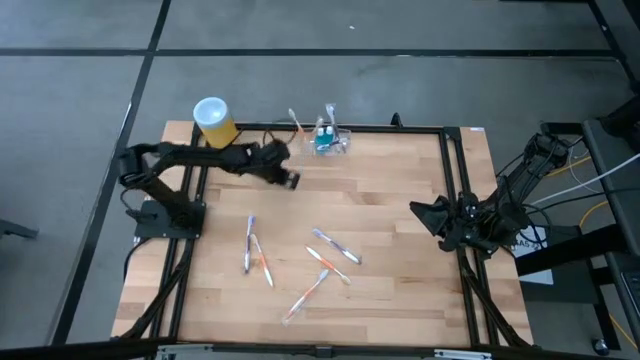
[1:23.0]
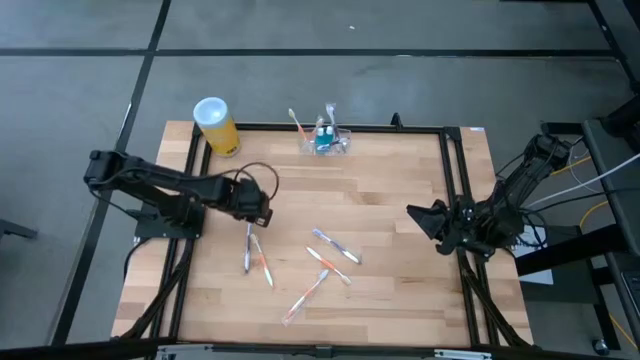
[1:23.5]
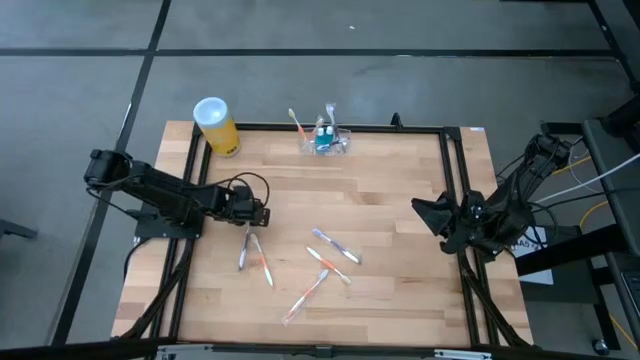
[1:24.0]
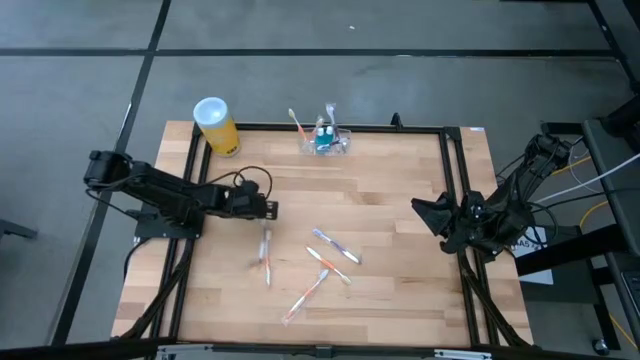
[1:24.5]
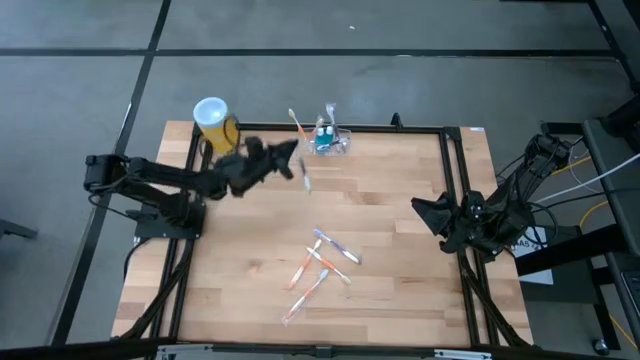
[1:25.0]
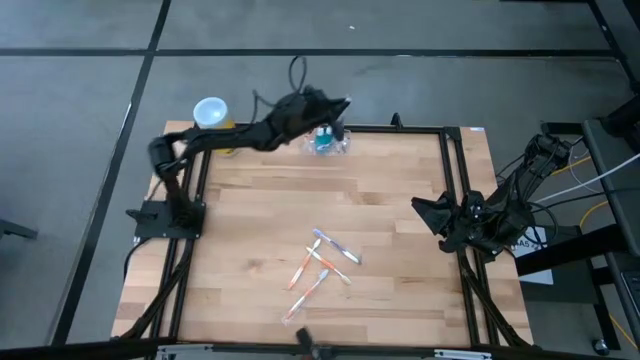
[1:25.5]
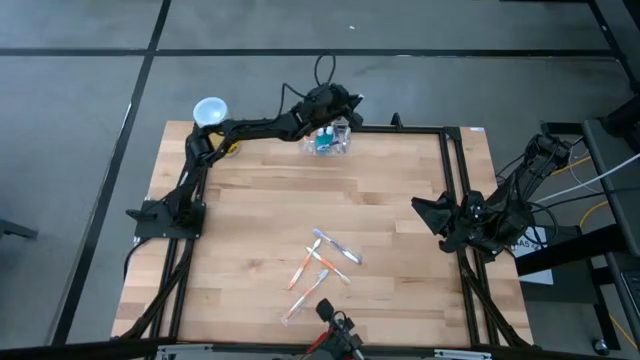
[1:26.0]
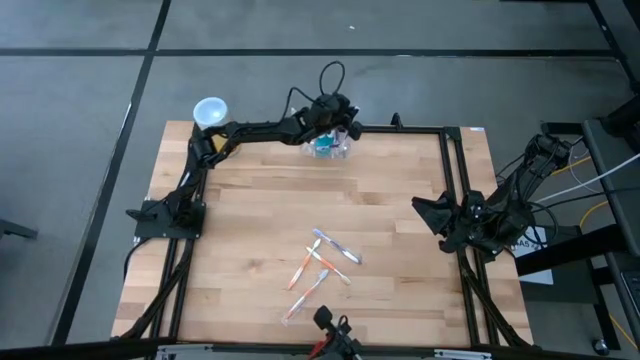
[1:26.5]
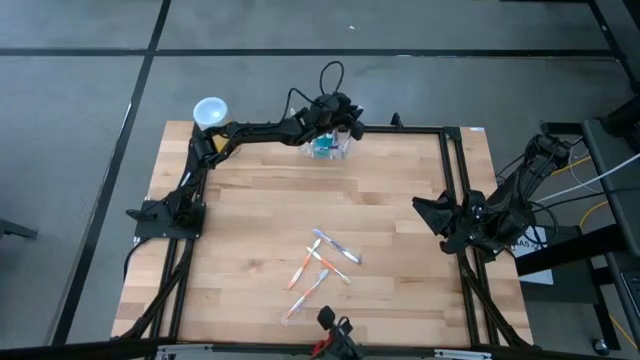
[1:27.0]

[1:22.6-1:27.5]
Task: Pick & Place toothbrushing station
Put the purple toothbrush into the right section of the transparent organizer

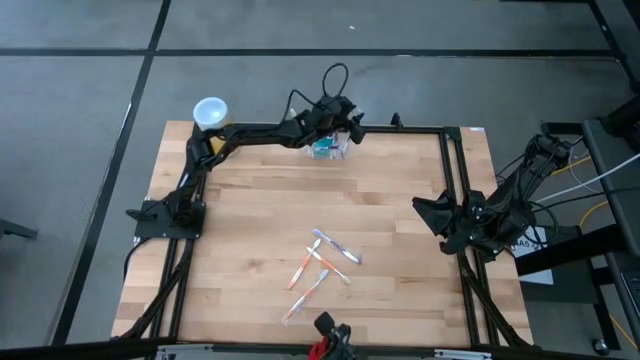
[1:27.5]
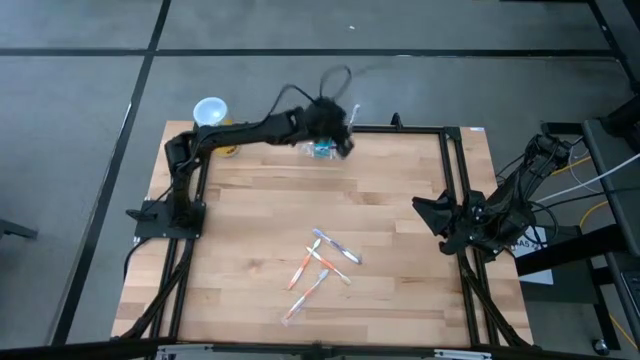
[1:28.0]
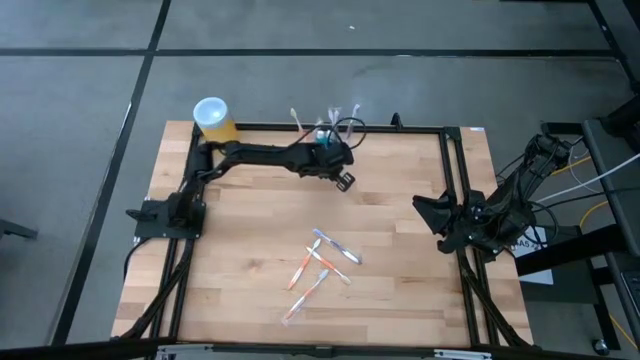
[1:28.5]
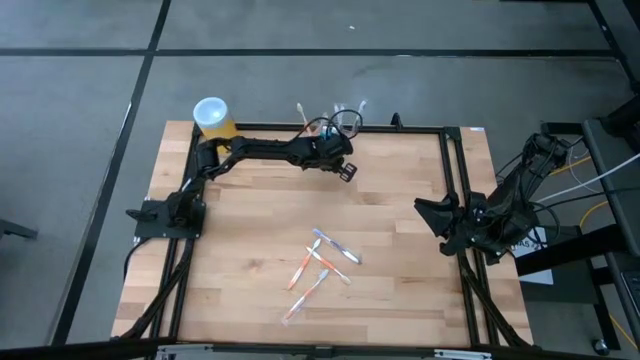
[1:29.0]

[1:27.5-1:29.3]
Adjust the transparent organizer on the table

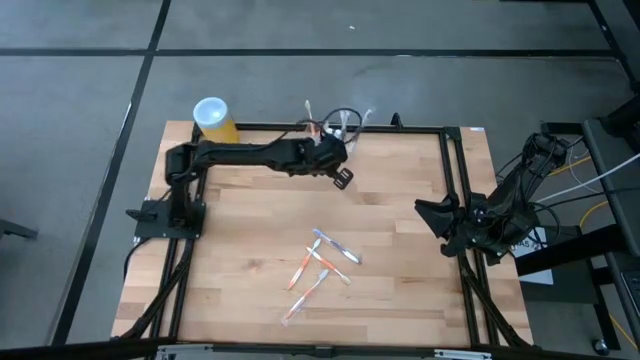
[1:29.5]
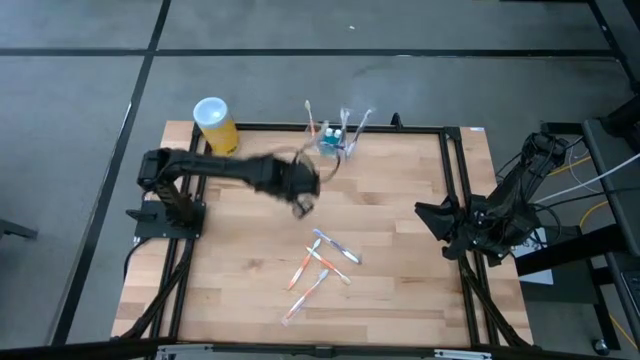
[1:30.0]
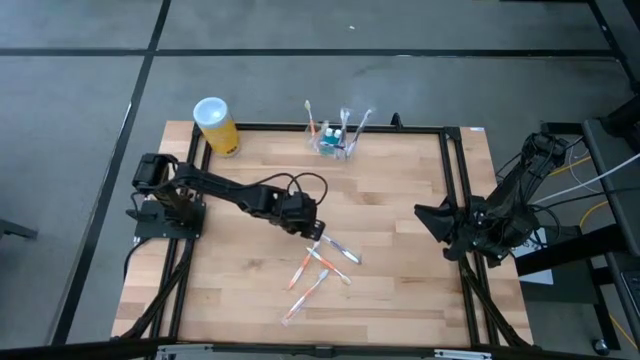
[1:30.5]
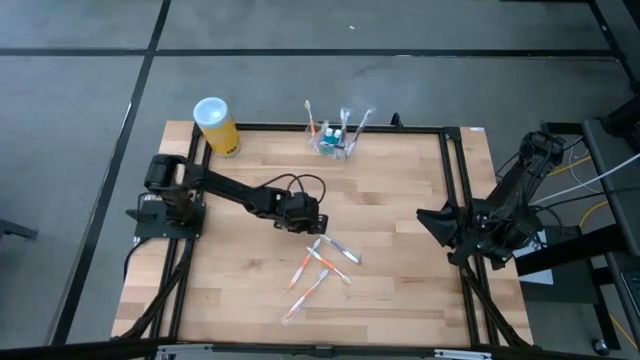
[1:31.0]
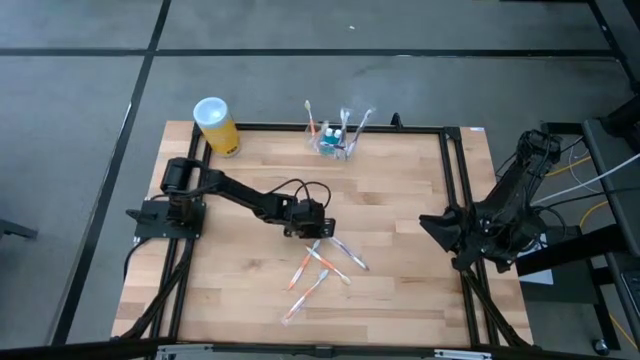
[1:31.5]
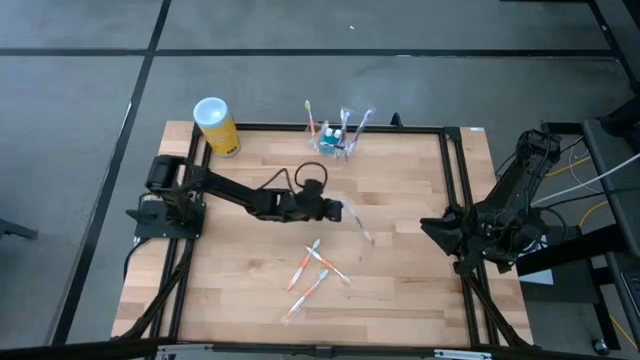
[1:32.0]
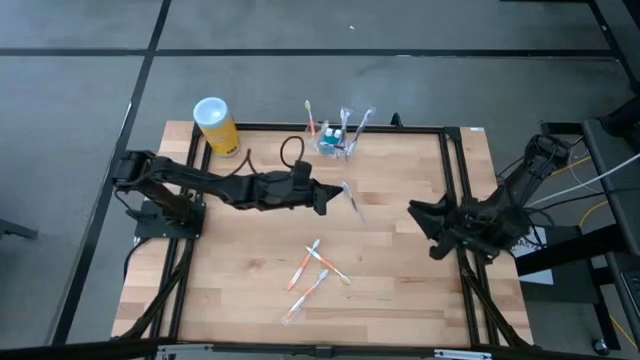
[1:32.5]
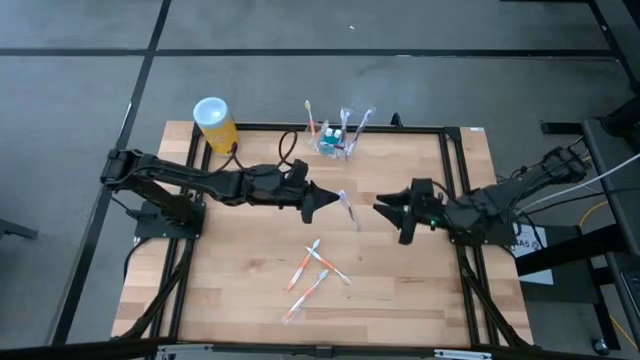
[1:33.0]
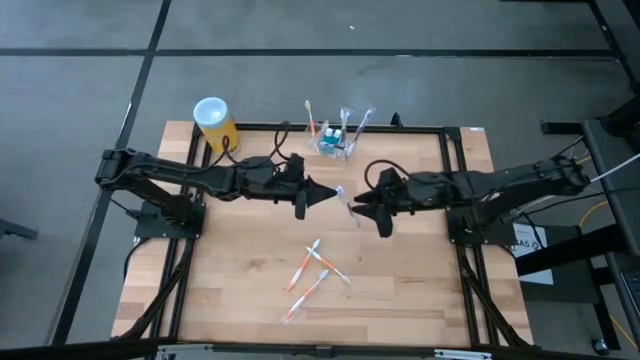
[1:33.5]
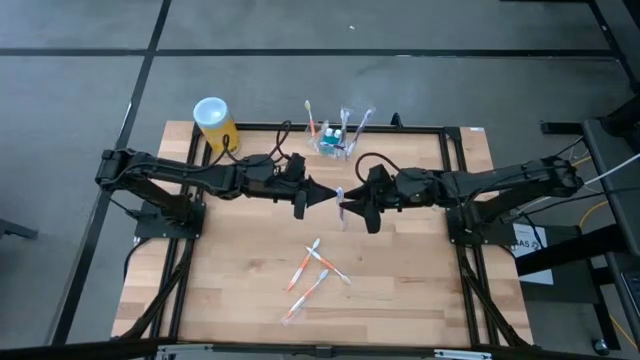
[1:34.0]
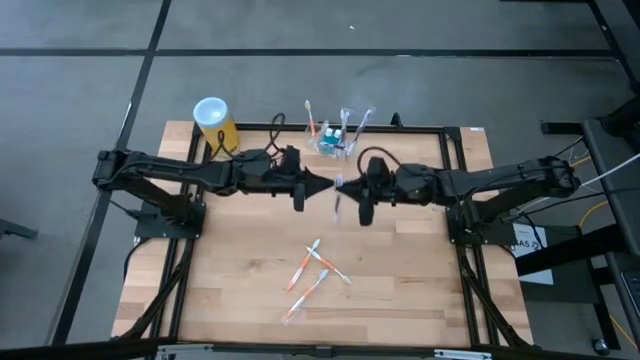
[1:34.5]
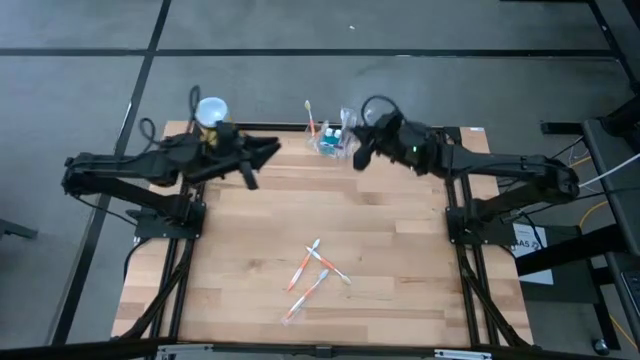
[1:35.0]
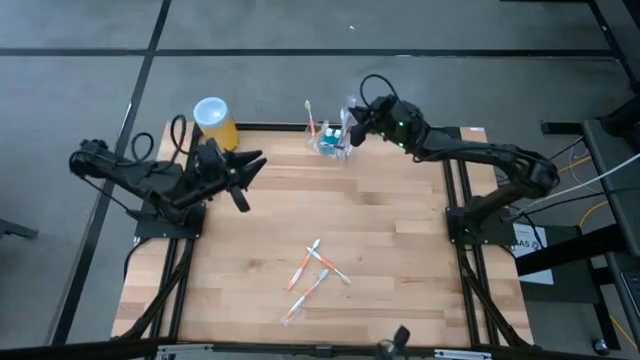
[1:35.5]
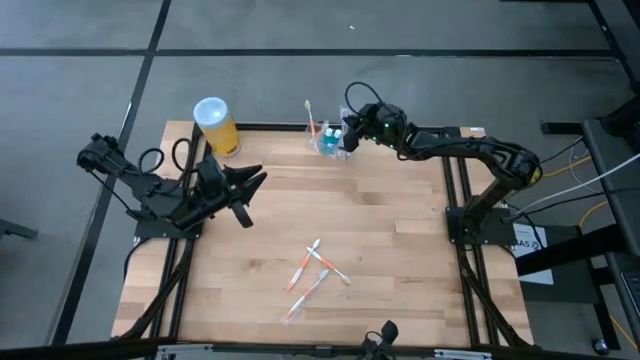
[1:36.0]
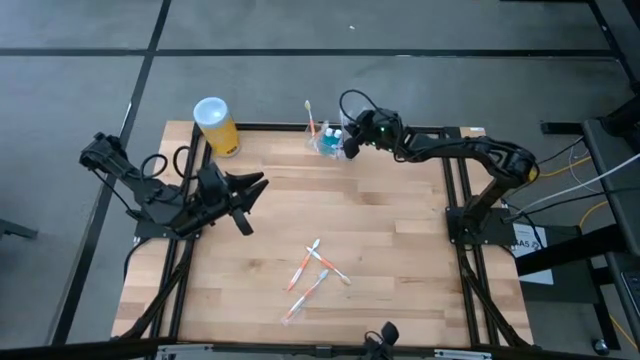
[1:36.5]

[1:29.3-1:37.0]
Put the purple toothbrush into the right section of the transparent organizer

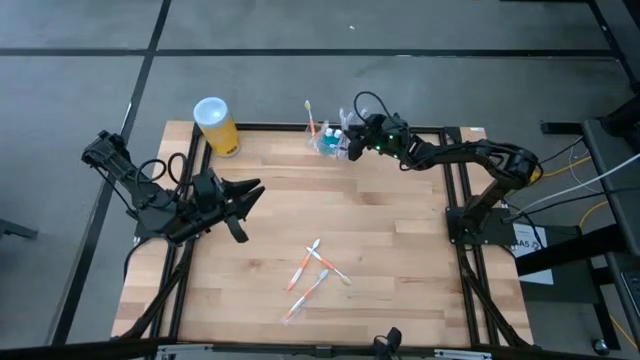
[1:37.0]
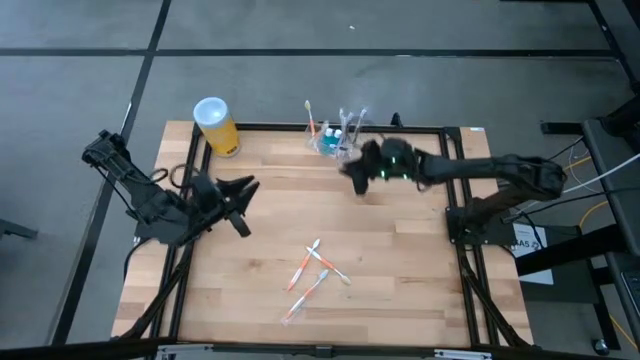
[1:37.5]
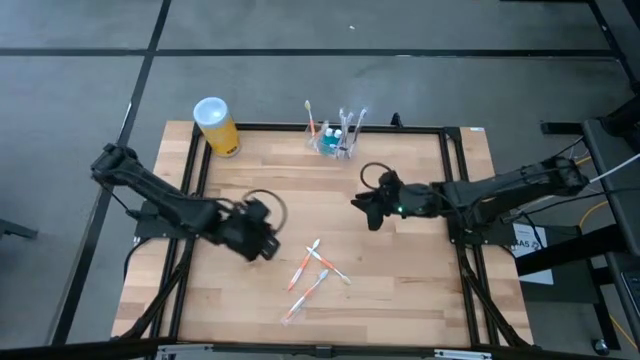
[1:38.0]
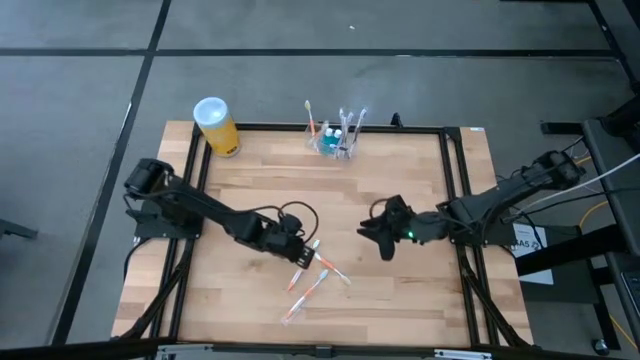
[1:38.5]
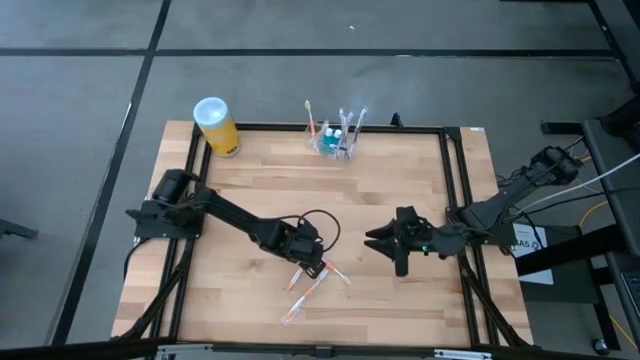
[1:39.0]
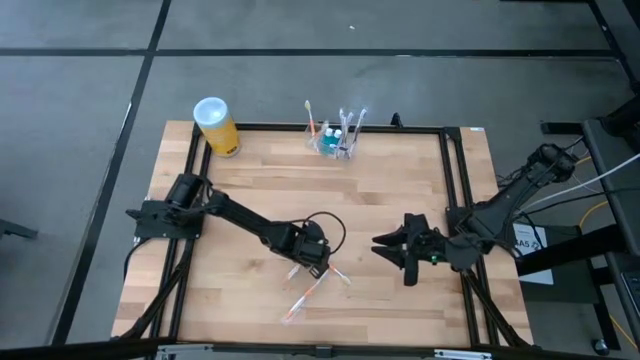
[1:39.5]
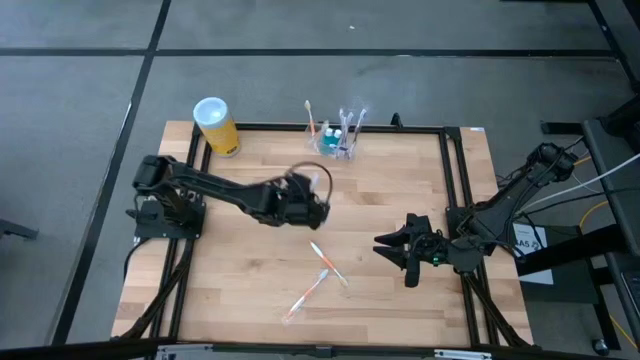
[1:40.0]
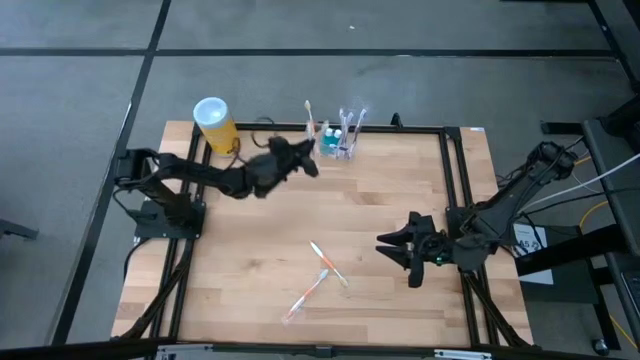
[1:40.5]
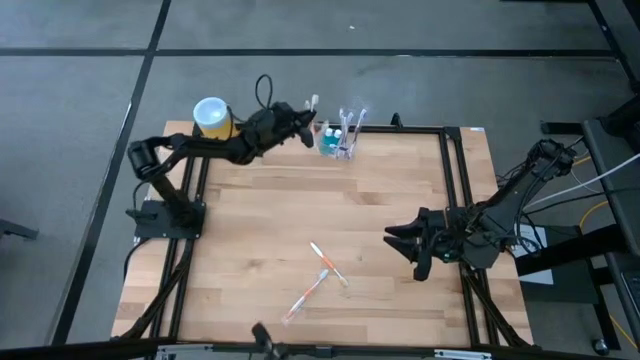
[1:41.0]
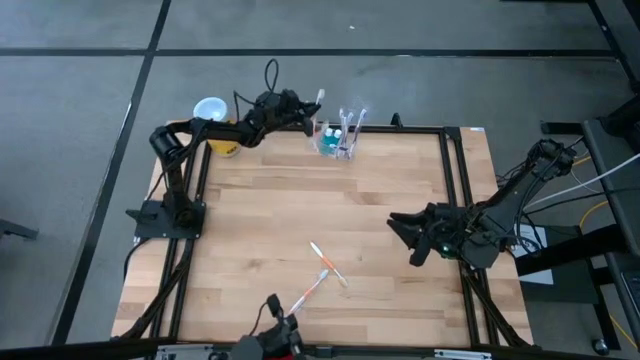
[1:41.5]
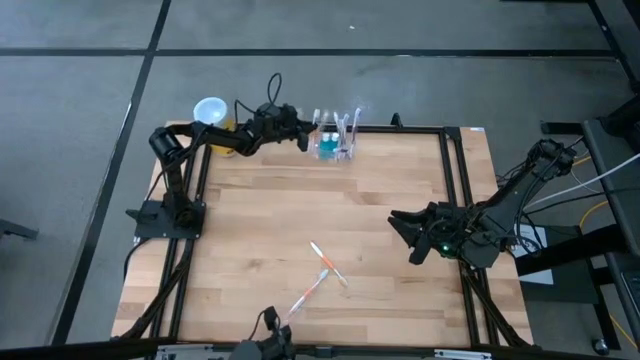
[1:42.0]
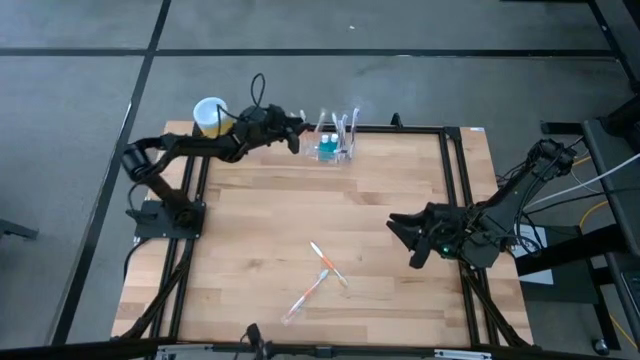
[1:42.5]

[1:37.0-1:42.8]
Put the orange toothbrush into the left section of the transparent organizer
